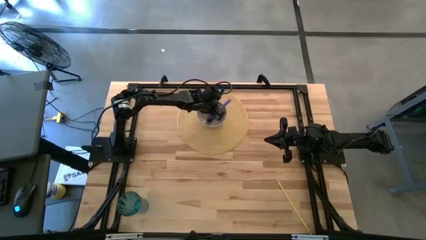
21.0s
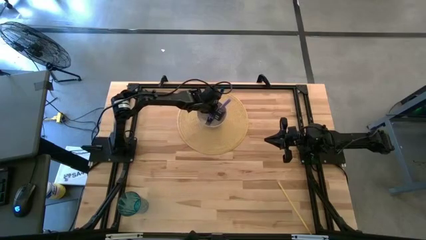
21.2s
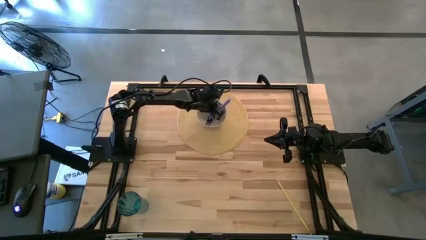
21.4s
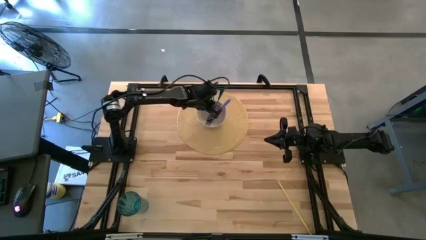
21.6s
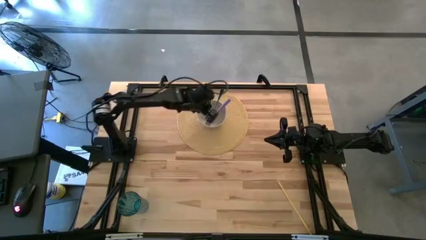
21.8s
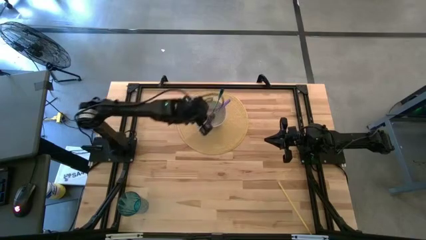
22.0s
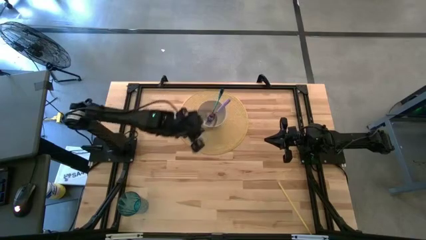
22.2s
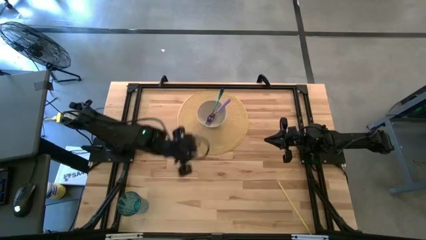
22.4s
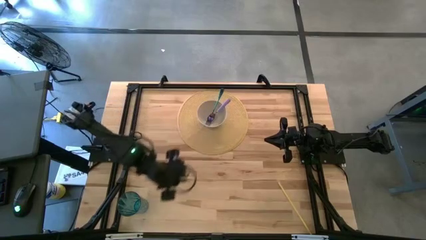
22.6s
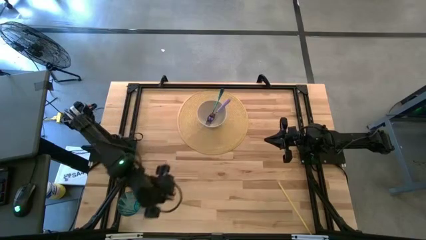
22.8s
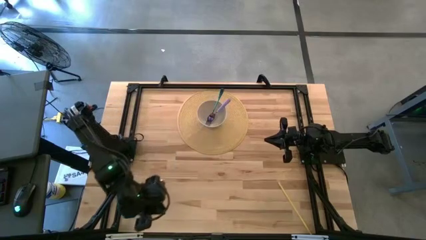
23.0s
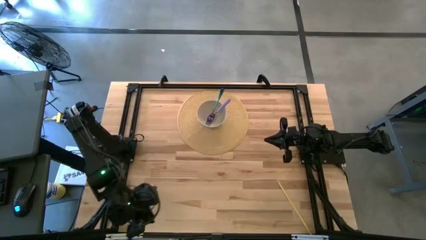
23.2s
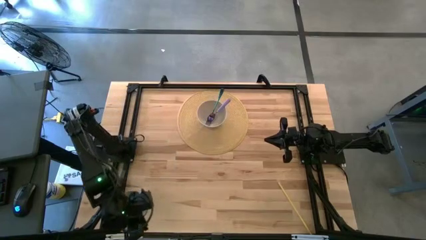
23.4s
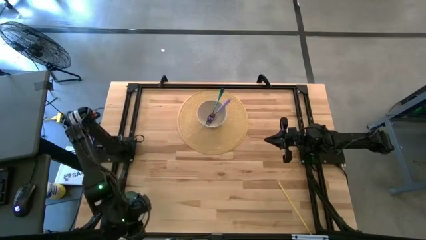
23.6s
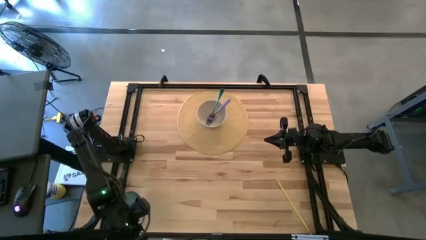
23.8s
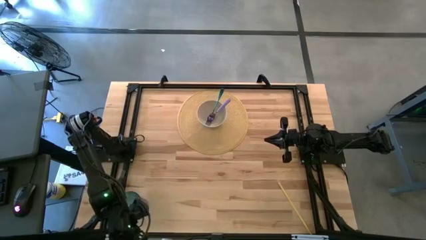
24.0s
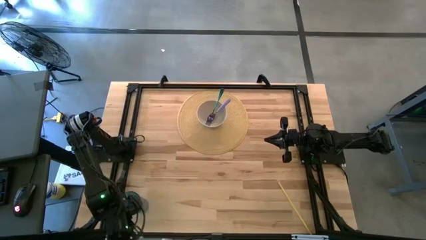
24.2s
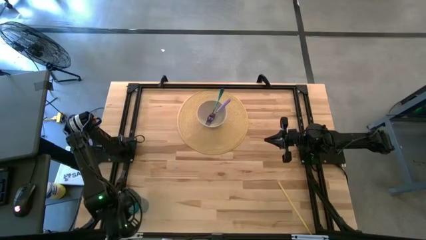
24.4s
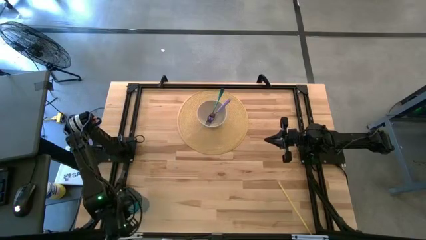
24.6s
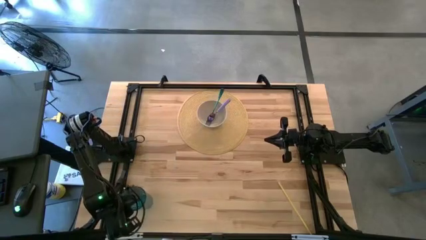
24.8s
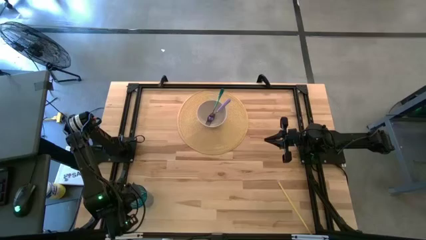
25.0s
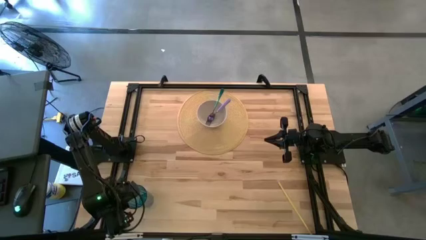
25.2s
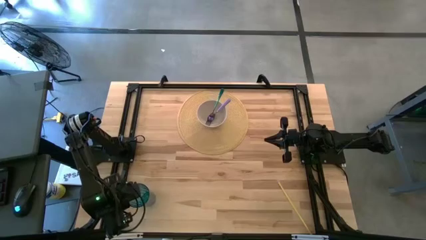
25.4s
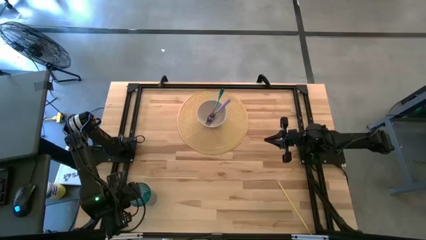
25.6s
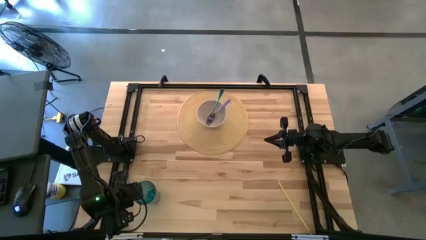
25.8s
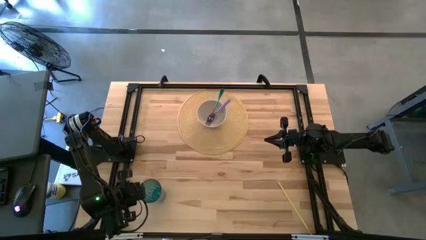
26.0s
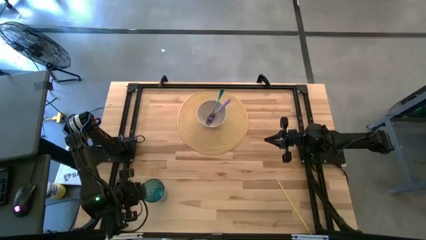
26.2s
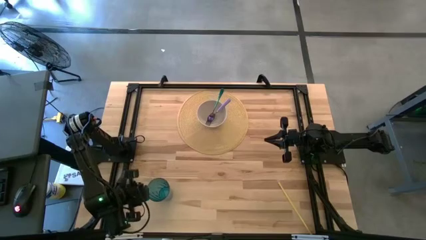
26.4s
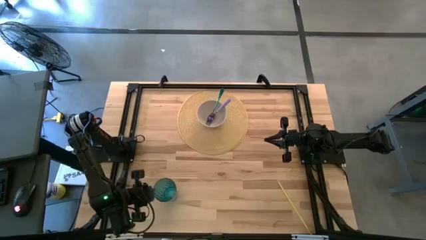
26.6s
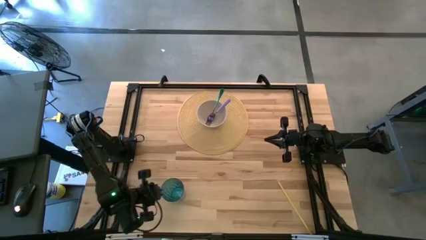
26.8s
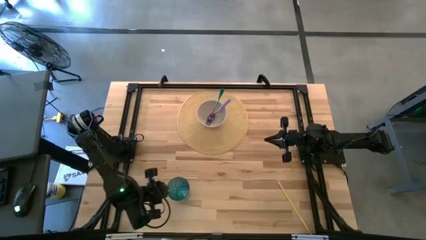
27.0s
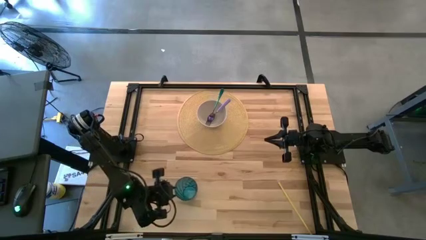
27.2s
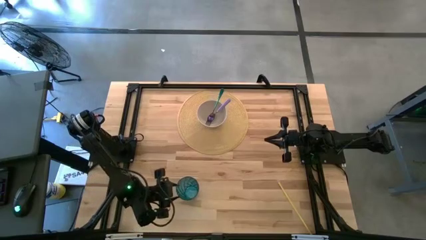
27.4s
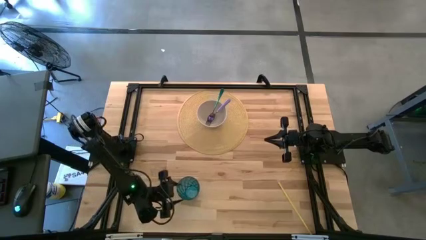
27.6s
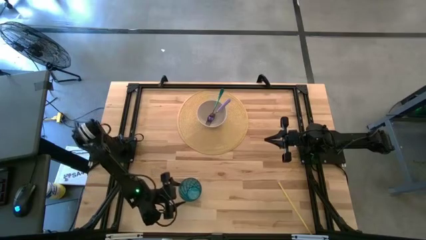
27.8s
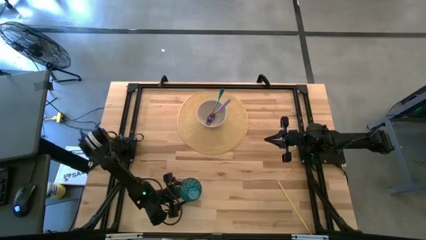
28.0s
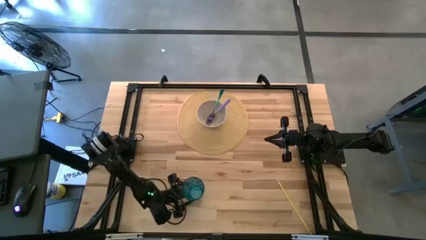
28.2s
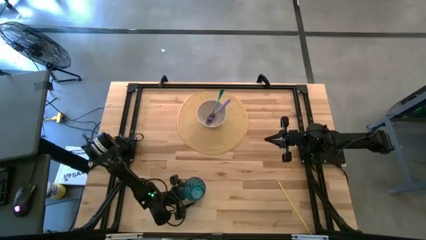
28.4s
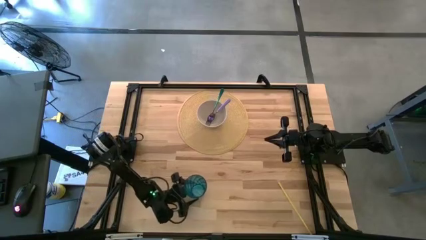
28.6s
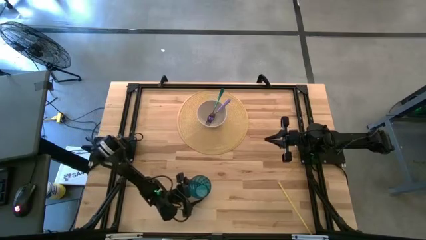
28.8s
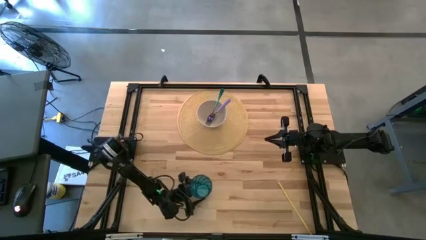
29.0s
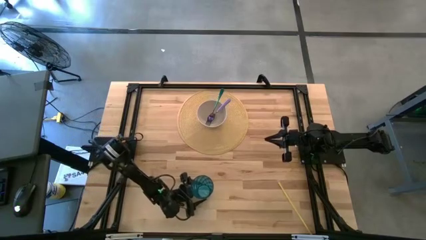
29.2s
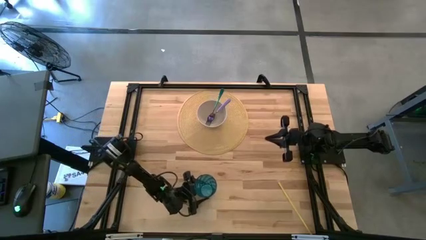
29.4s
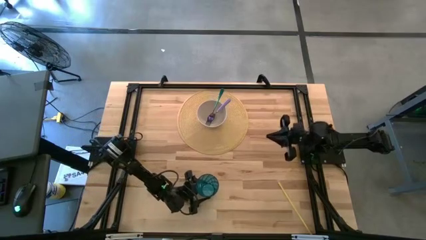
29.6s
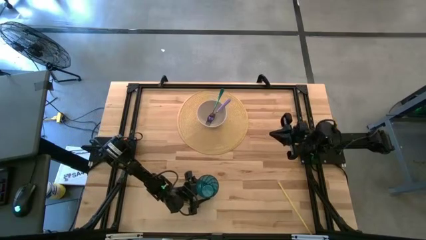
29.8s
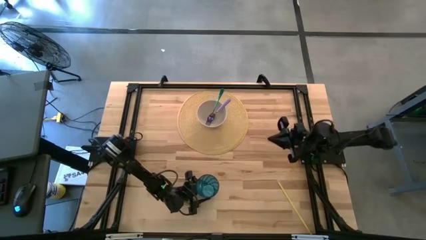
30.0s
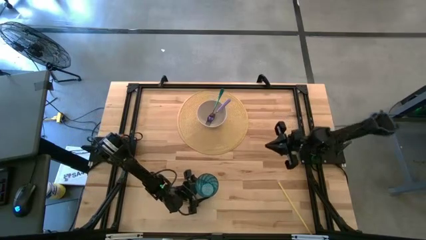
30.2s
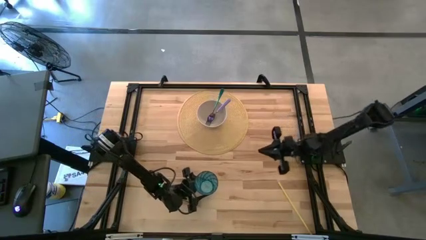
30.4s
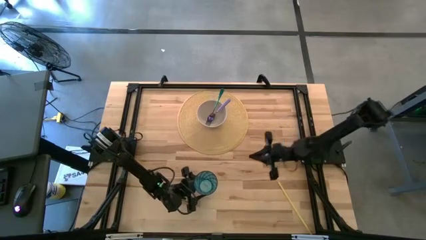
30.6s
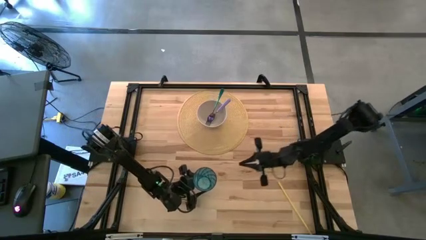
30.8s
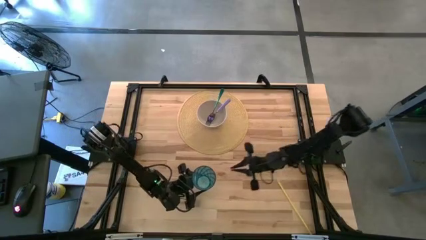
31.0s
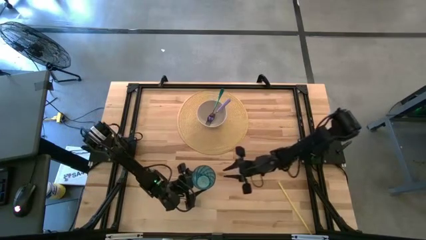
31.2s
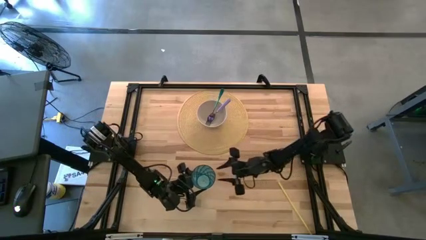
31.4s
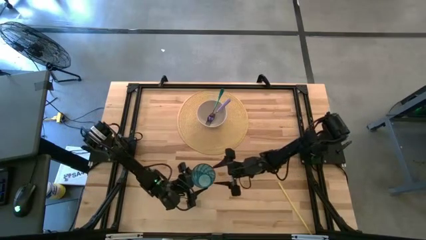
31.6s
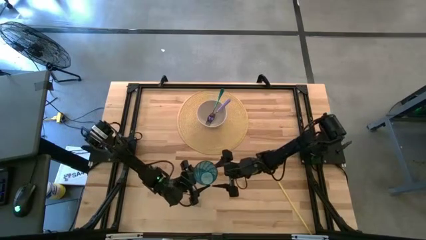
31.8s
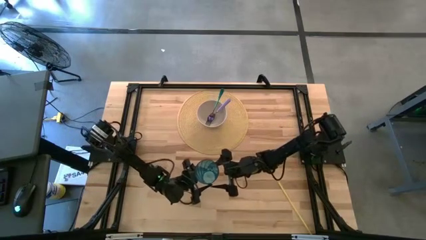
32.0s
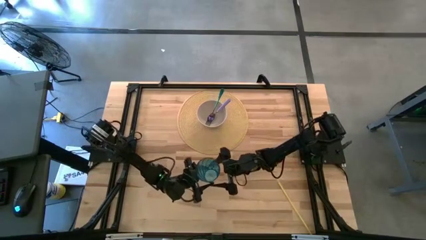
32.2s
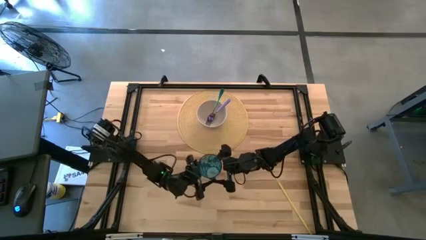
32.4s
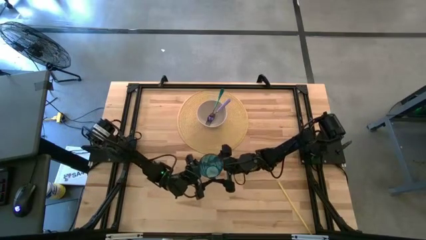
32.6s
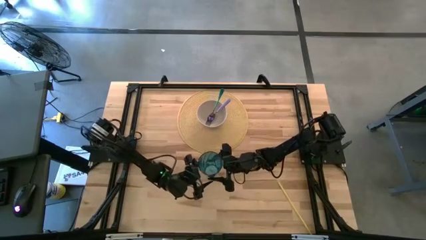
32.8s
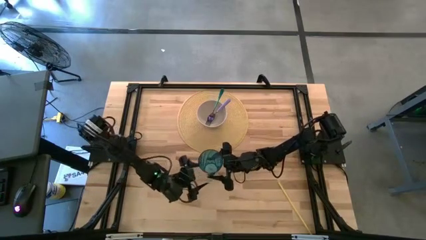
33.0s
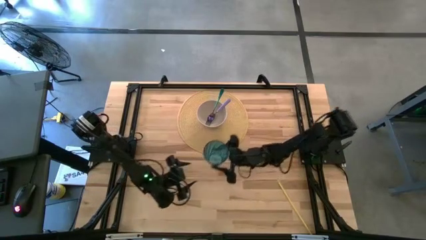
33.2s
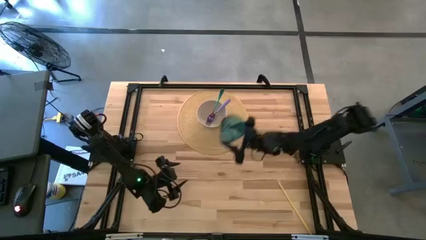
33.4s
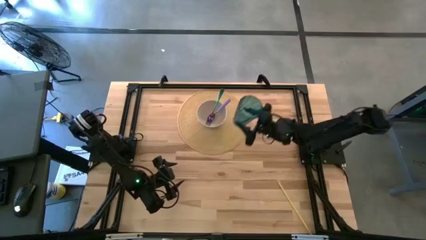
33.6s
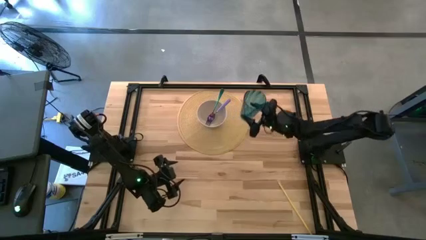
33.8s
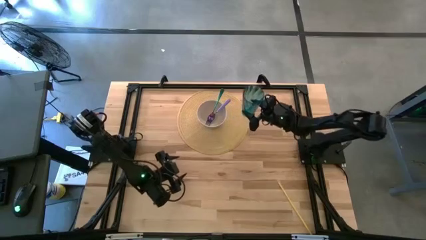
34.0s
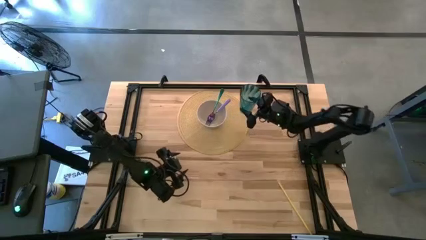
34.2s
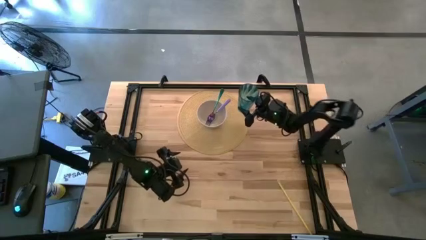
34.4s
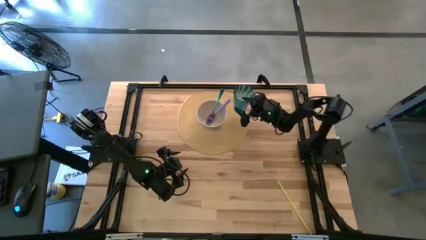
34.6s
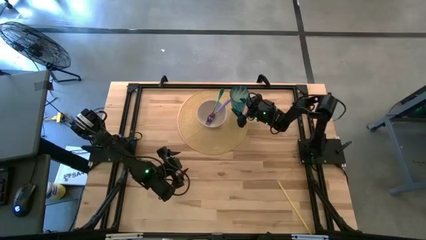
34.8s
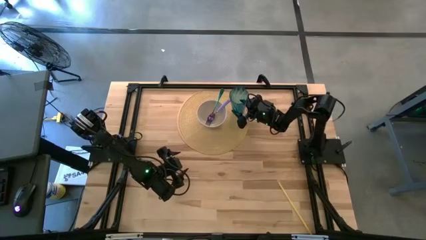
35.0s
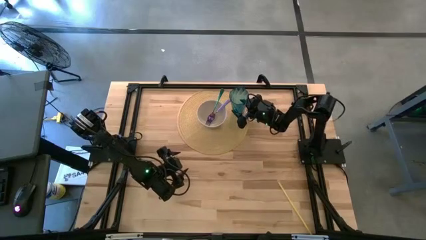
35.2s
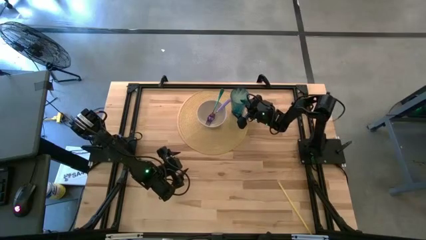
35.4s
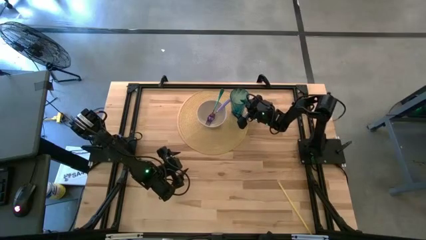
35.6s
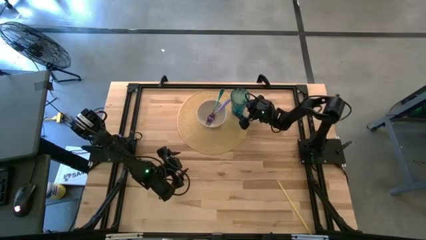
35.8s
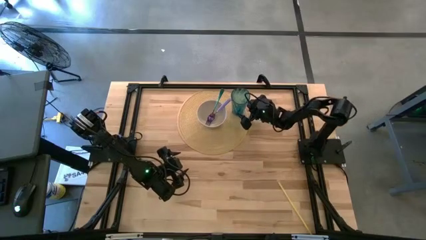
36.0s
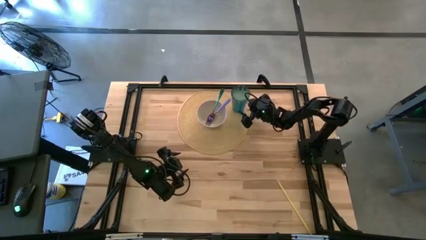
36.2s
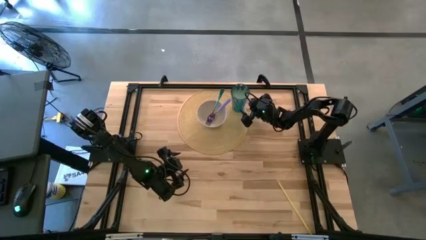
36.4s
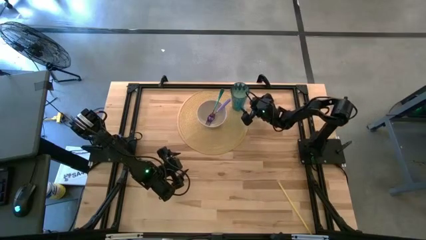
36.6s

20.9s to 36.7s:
Task: Pick & Place Utensil
Put the blue cup on the mat to the top right of the white bowl
